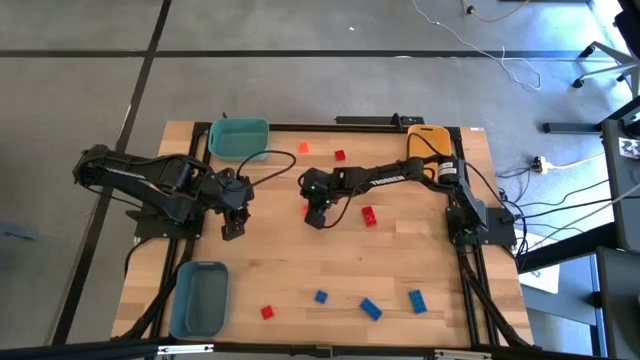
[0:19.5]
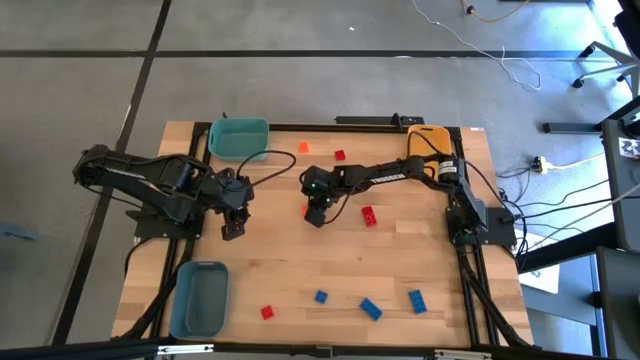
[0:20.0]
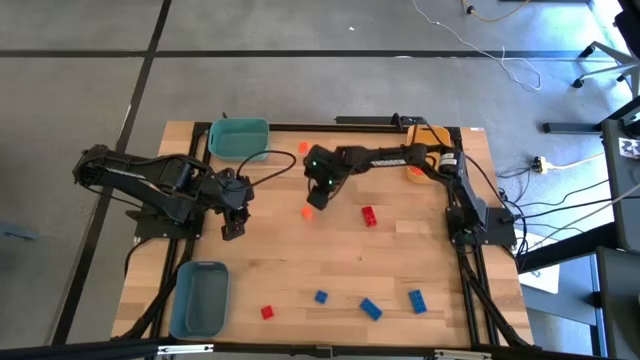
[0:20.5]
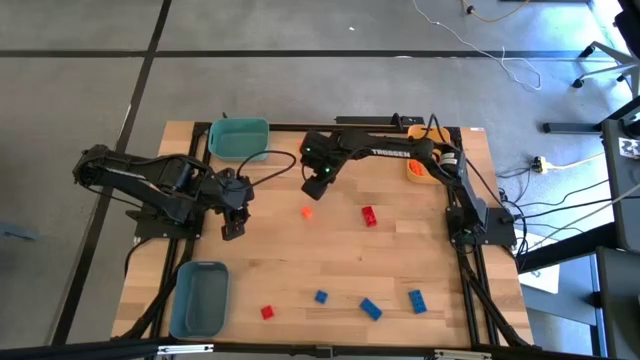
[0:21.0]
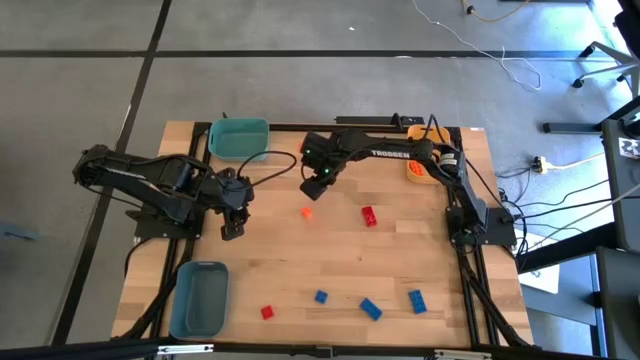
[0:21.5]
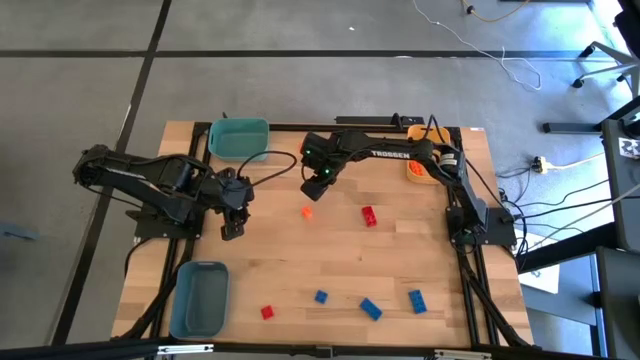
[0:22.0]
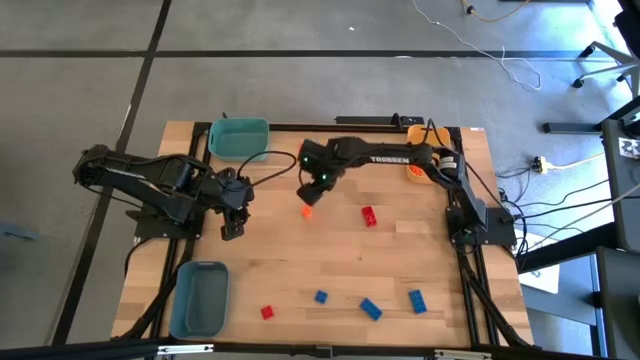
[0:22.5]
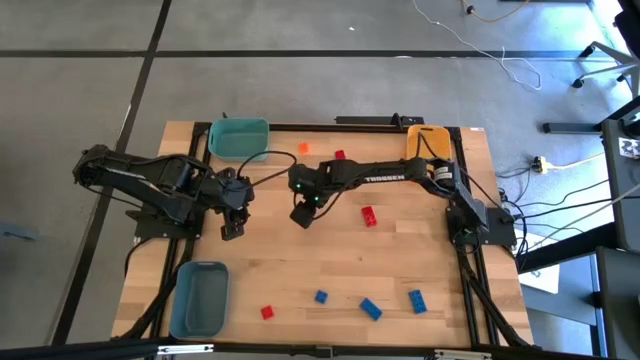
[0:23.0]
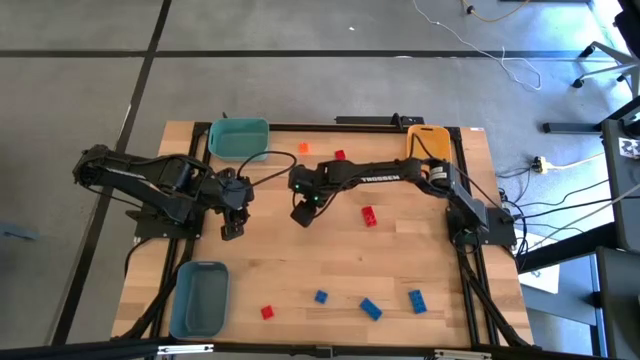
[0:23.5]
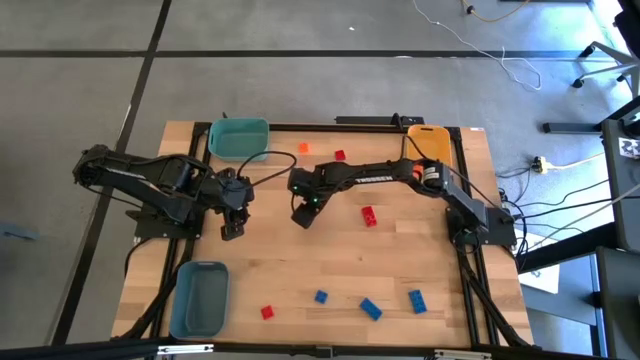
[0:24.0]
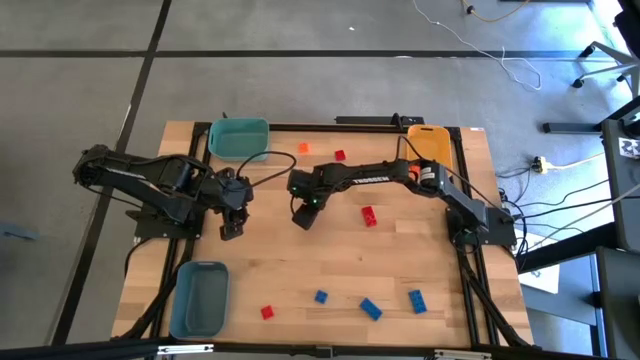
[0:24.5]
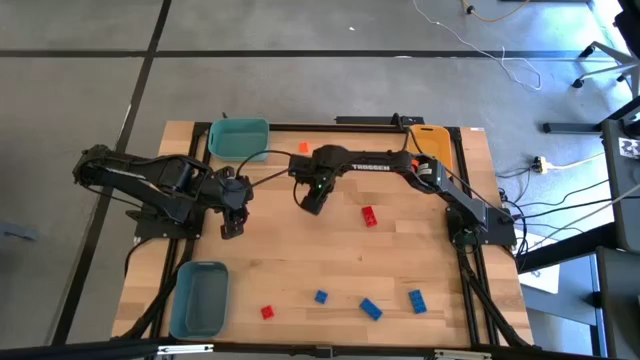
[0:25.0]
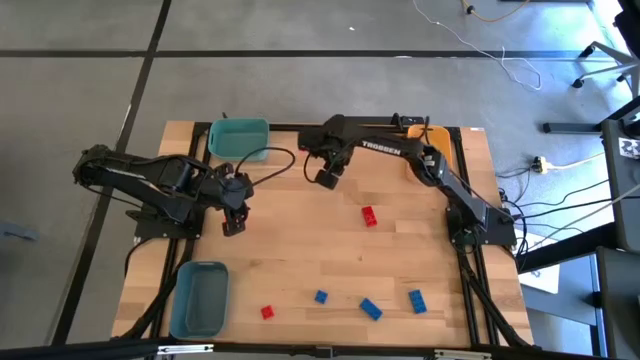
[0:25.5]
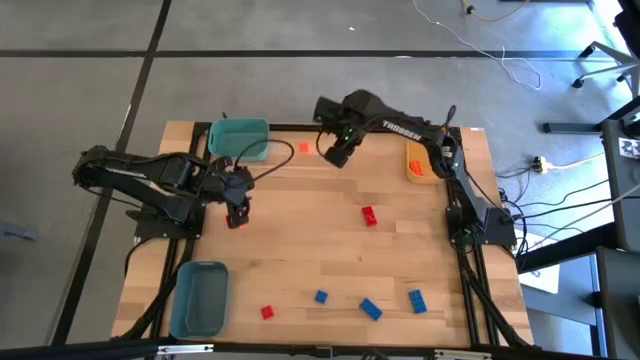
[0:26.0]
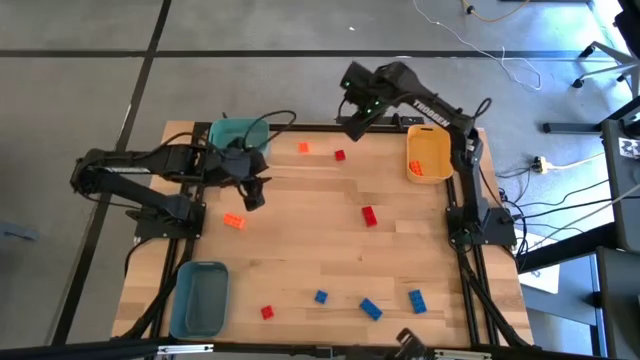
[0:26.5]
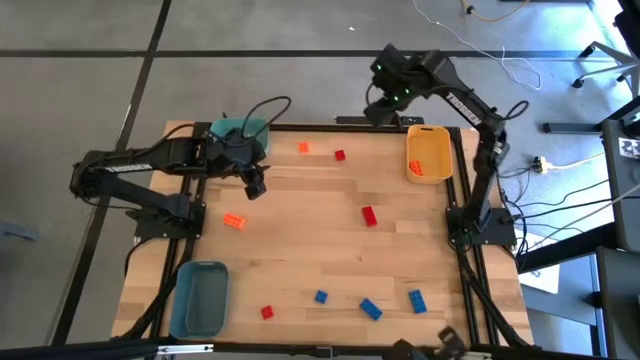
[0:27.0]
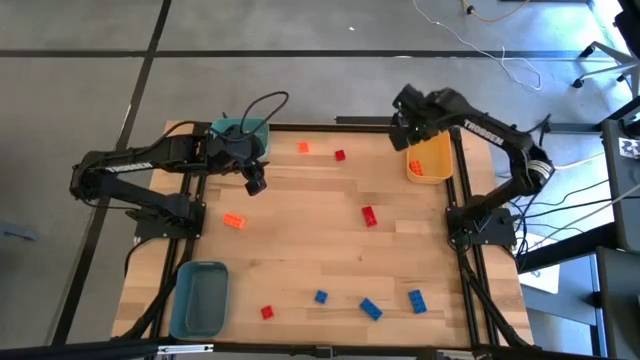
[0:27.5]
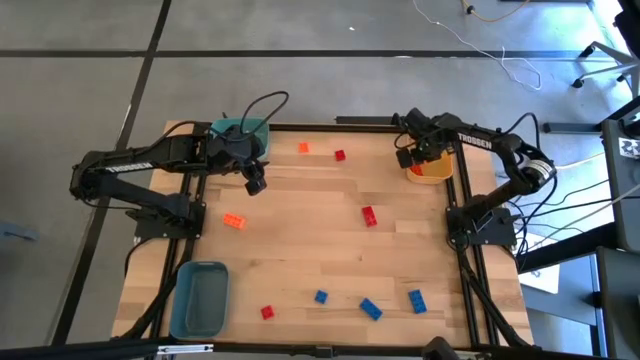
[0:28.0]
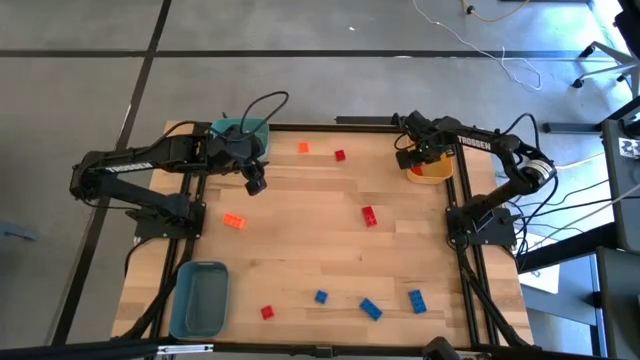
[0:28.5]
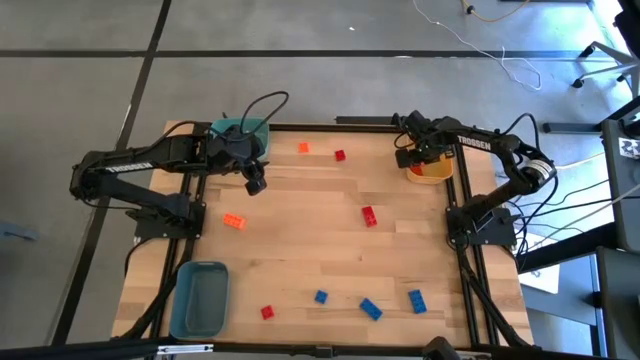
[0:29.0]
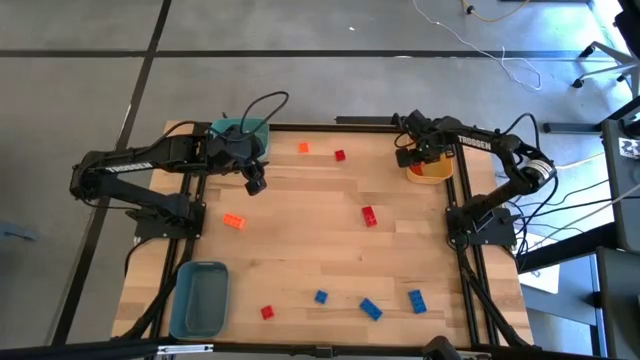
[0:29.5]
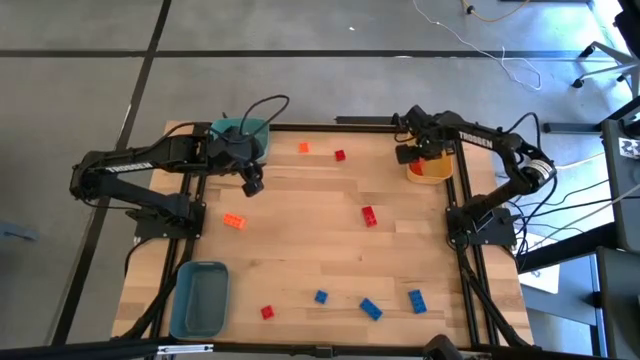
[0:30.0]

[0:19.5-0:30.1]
Task: Sort & place blocks by color
Put the orange game piece into the yellow bin

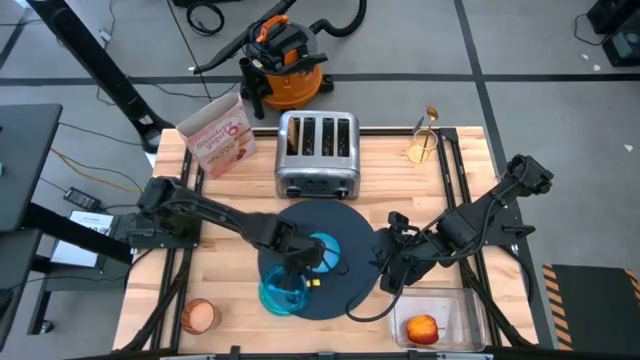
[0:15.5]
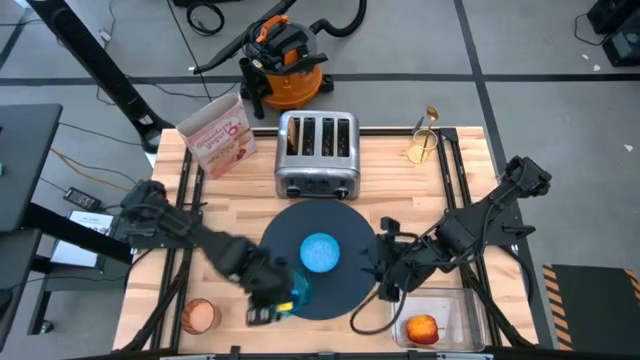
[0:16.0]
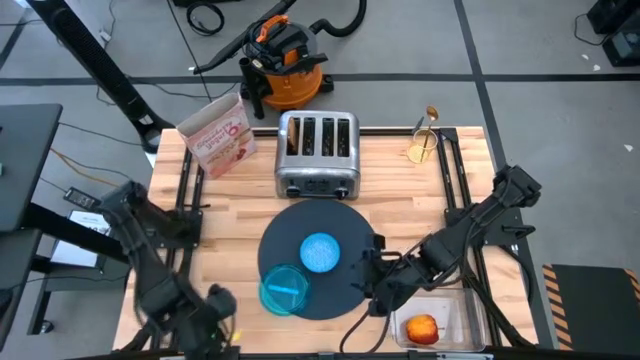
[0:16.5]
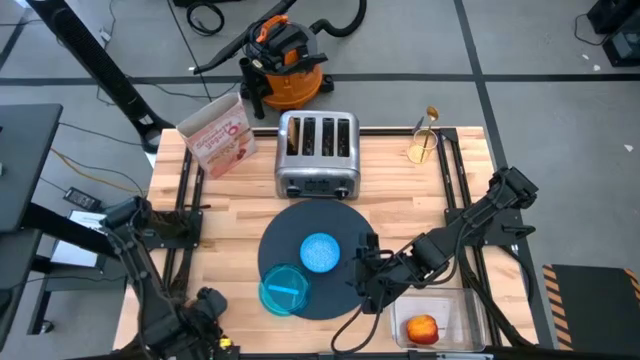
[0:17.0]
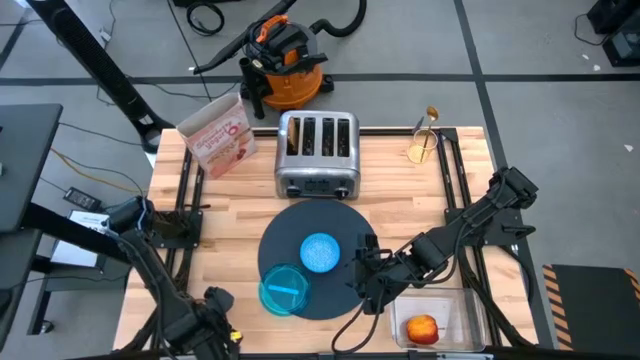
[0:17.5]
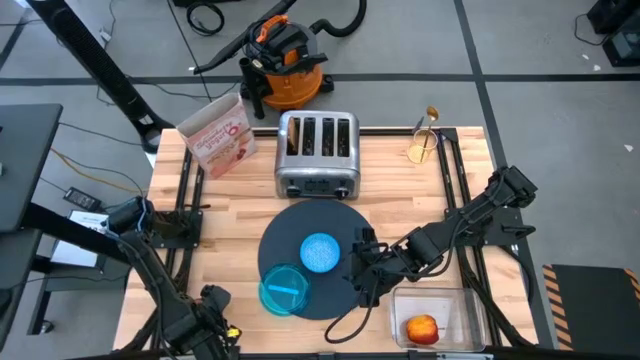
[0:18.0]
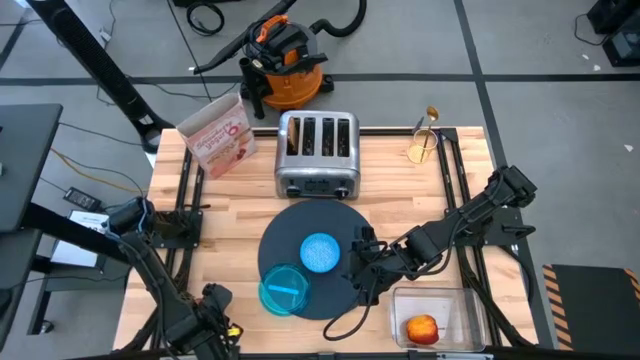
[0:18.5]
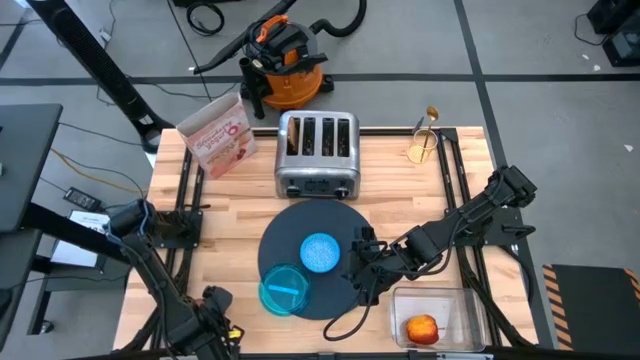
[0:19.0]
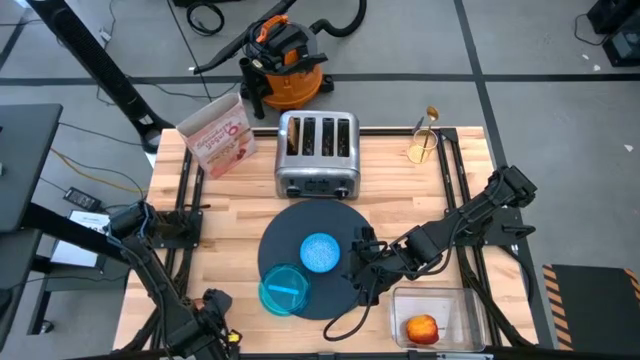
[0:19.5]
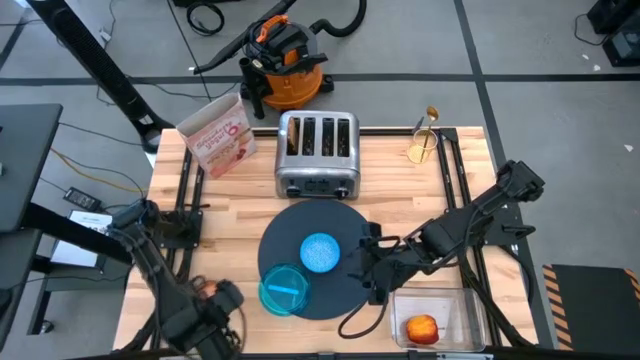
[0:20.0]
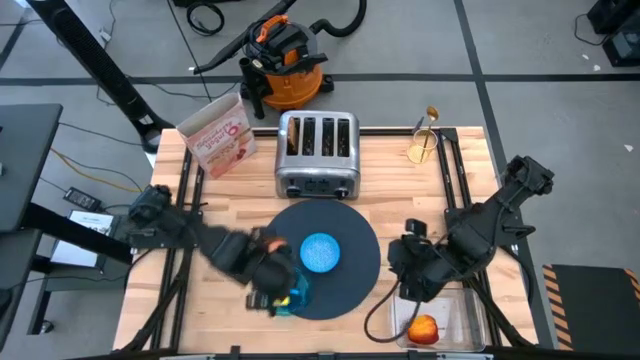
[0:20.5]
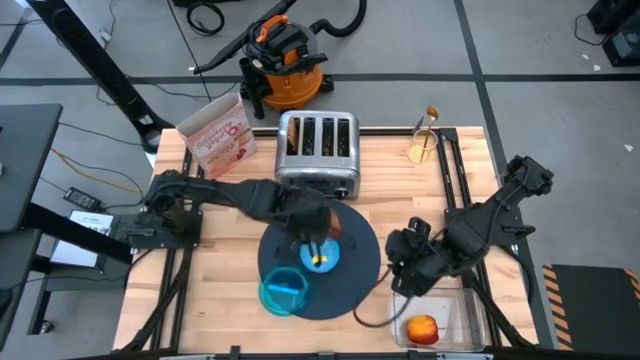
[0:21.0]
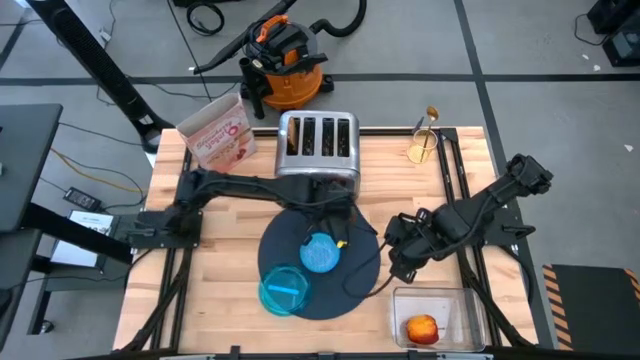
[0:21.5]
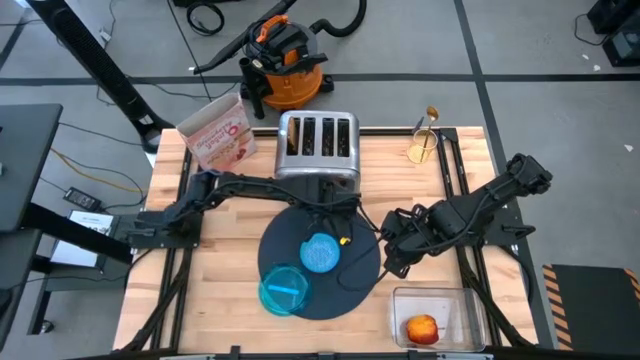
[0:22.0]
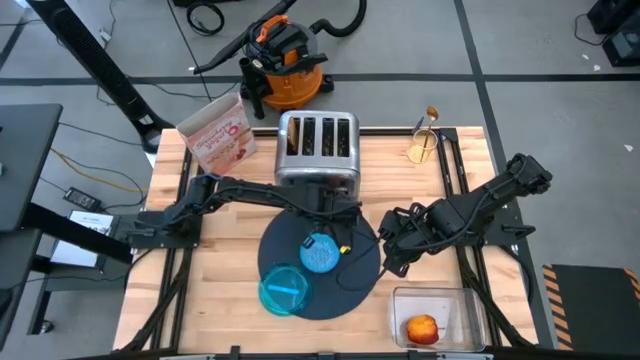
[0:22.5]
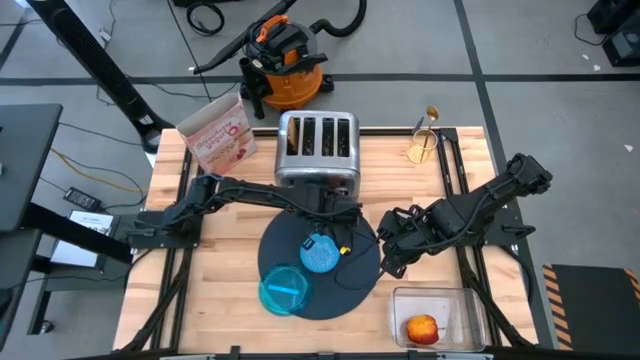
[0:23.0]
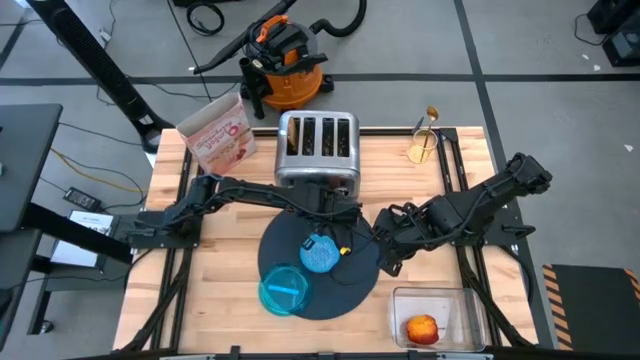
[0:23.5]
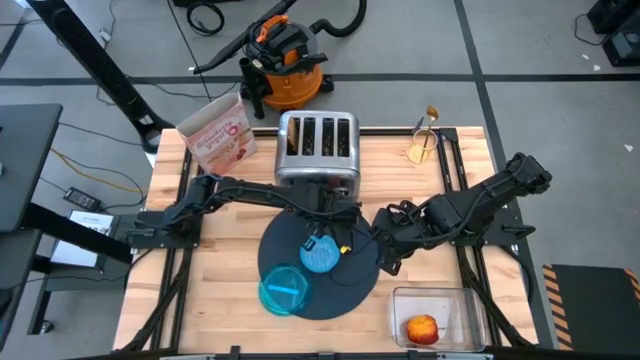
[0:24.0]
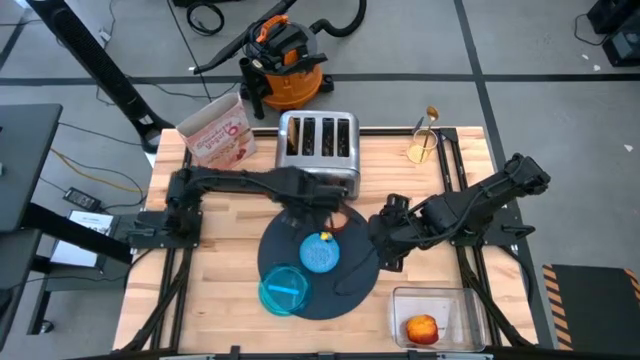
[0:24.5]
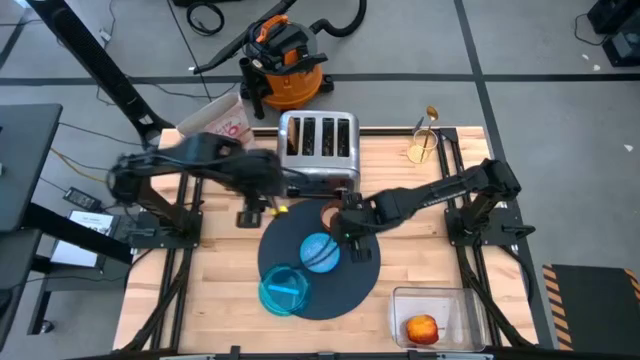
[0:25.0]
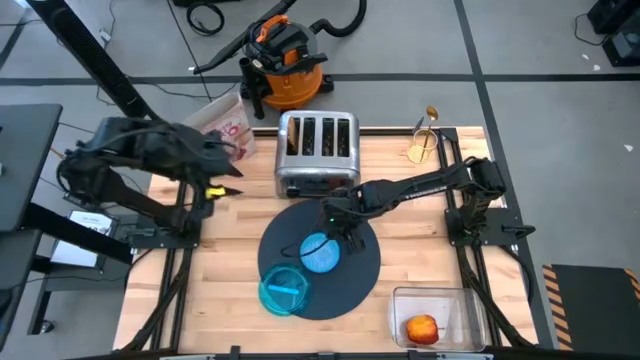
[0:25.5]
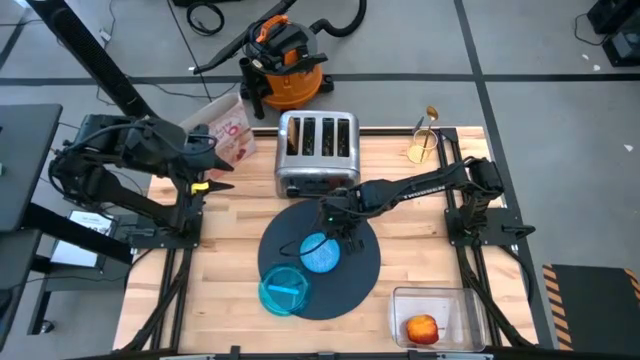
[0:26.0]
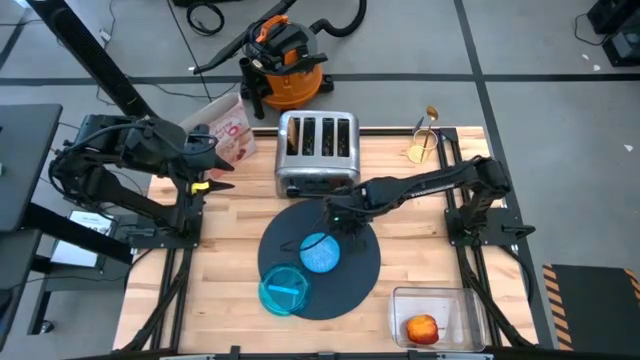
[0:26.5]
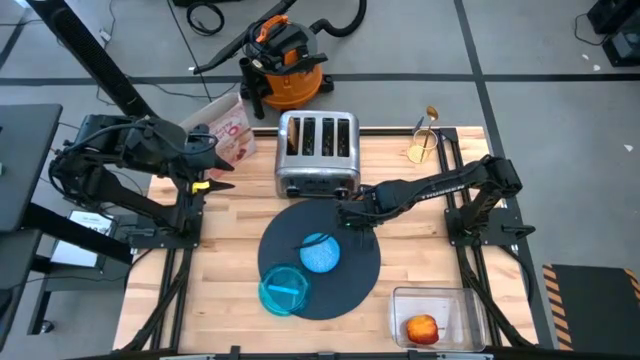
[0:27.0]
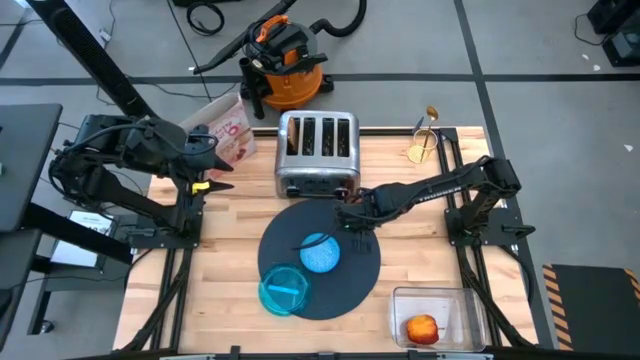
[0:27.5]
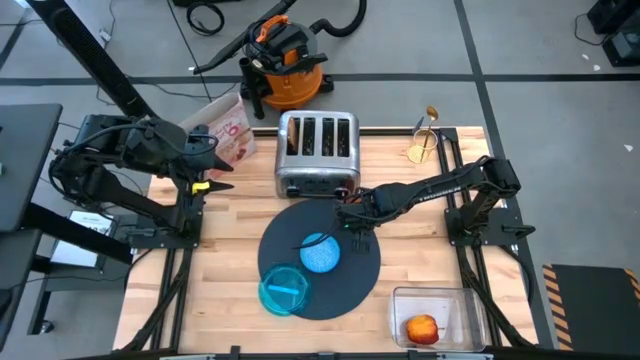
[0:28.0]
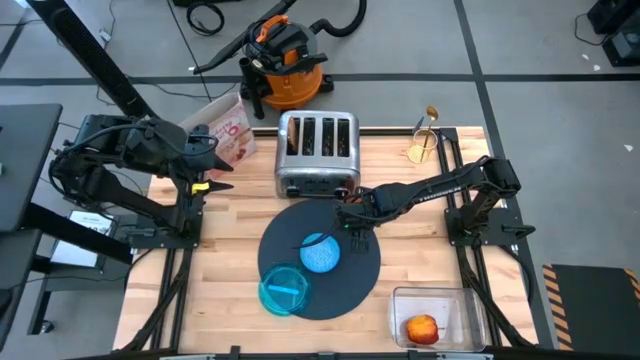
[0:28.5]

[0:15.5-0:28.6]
Task: Arrange a breakfast setting
Put the orange cup on the top right side of the blue bowl
